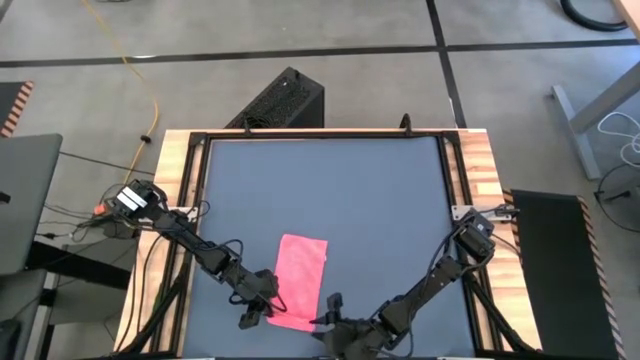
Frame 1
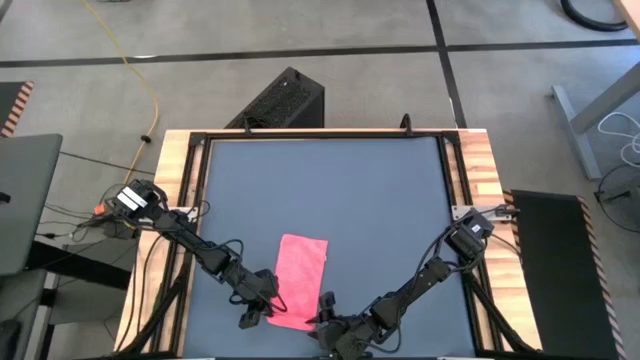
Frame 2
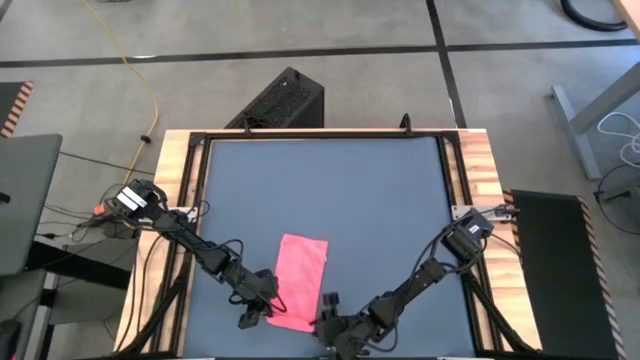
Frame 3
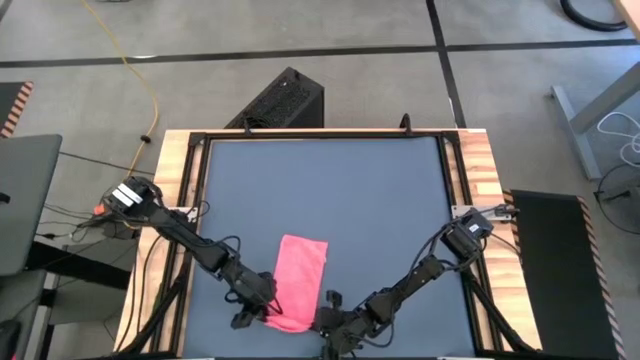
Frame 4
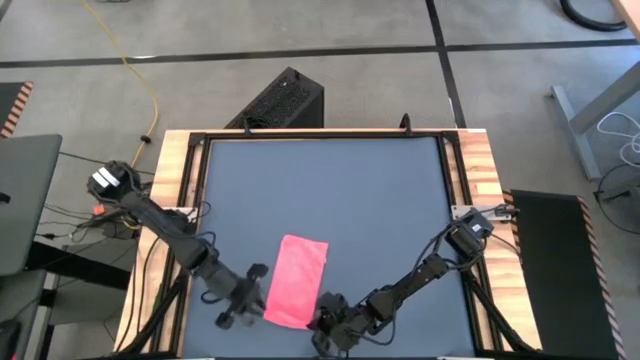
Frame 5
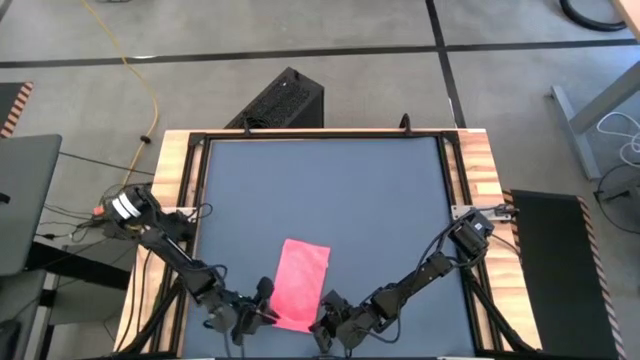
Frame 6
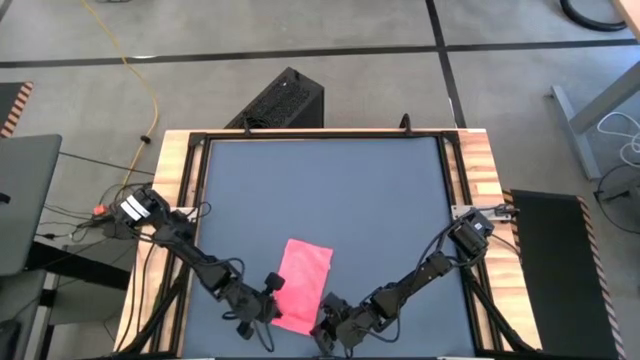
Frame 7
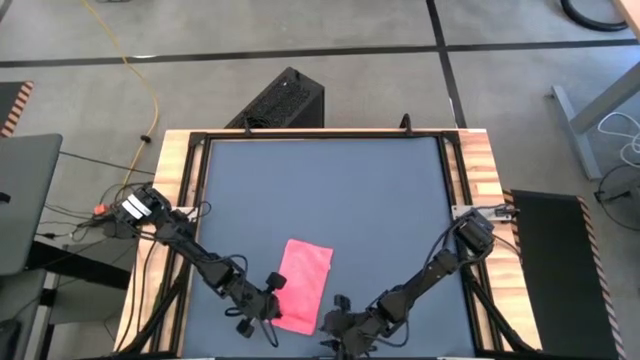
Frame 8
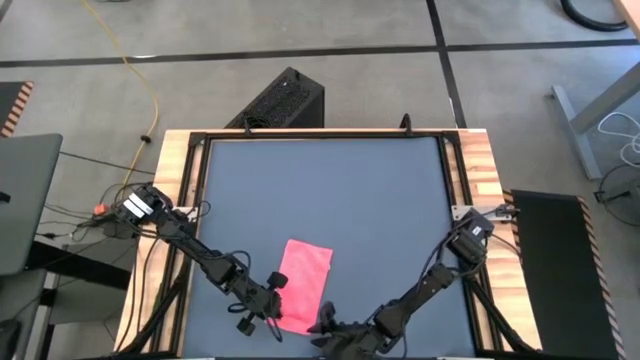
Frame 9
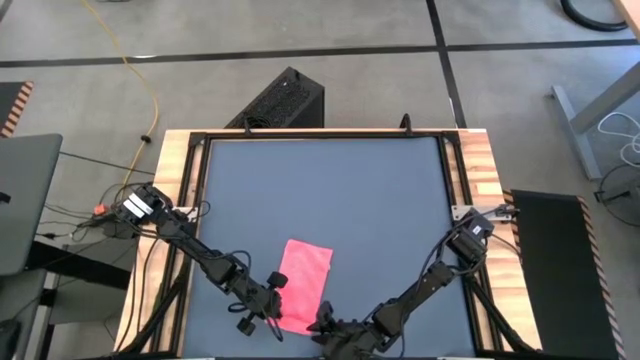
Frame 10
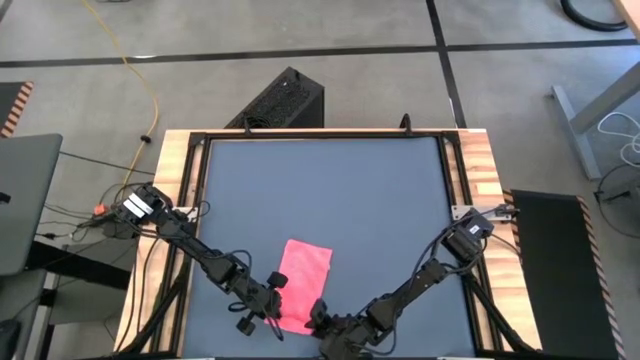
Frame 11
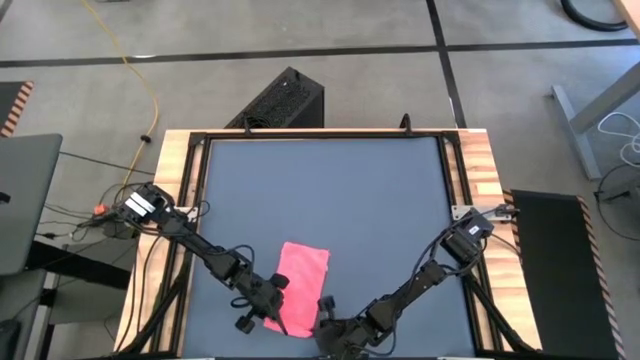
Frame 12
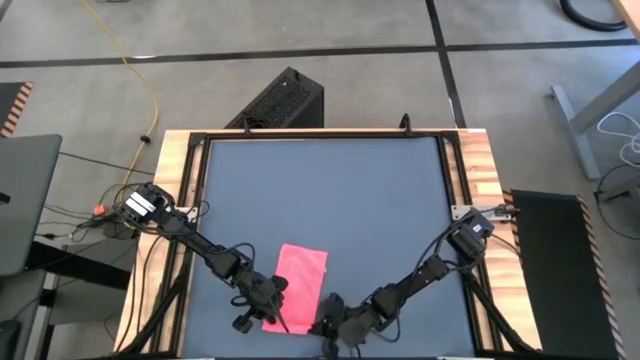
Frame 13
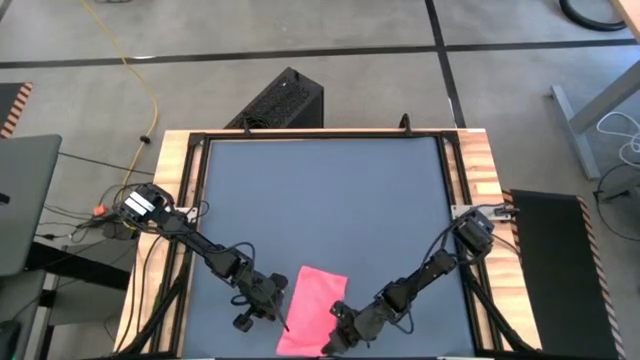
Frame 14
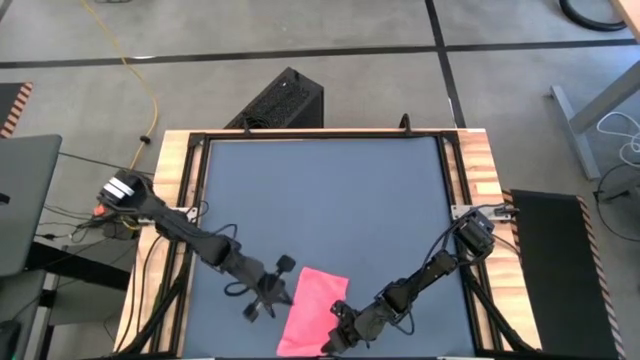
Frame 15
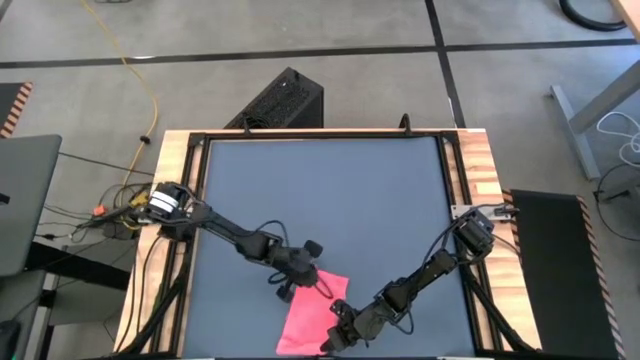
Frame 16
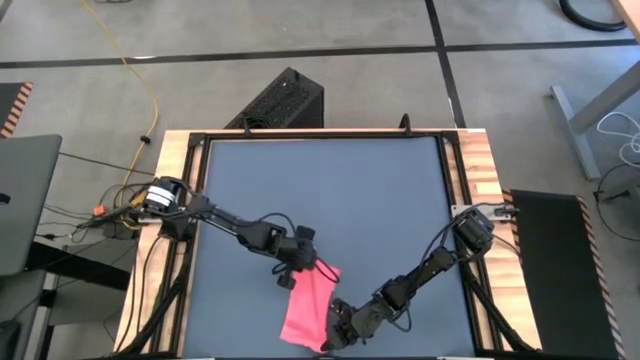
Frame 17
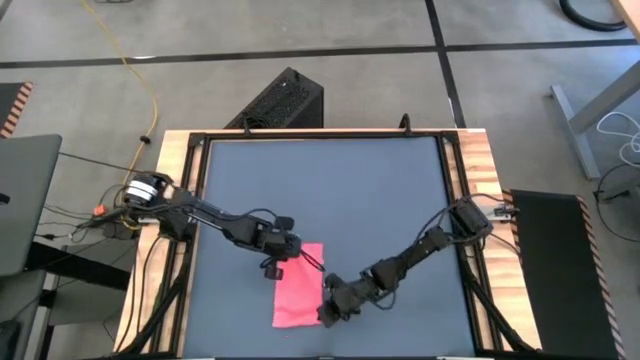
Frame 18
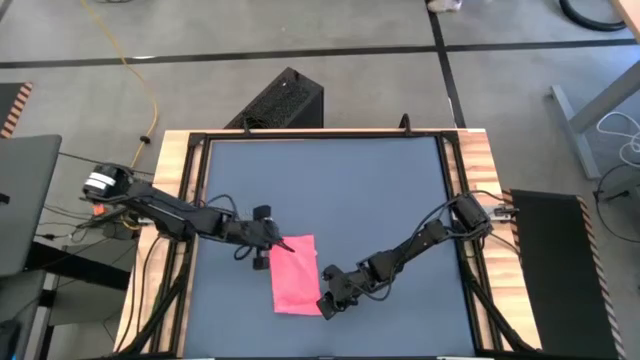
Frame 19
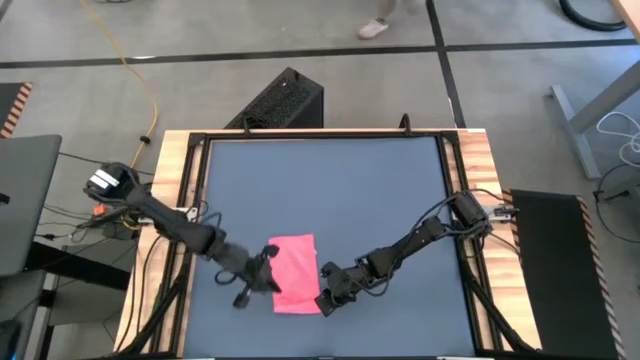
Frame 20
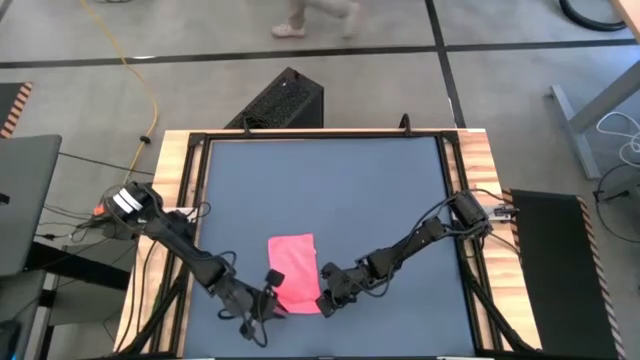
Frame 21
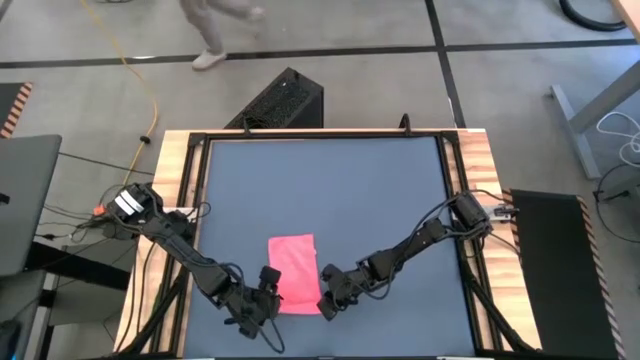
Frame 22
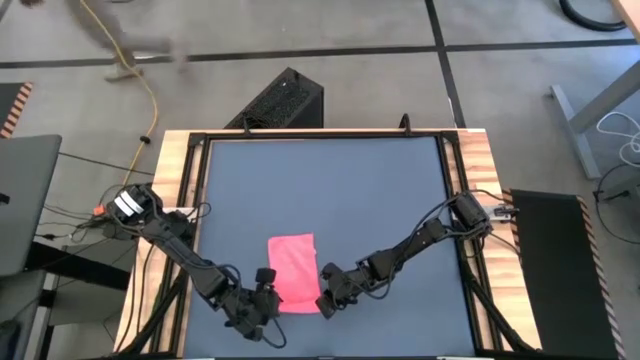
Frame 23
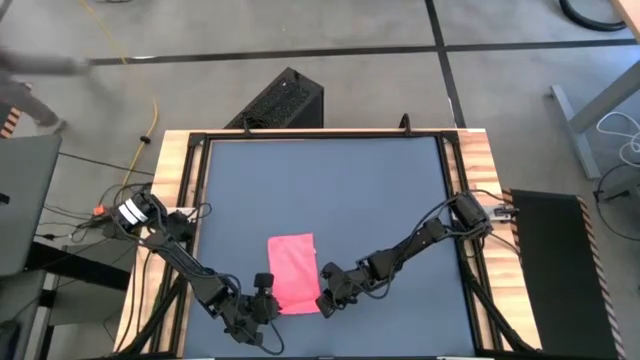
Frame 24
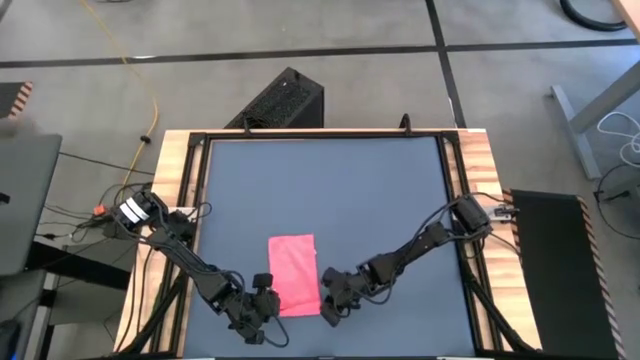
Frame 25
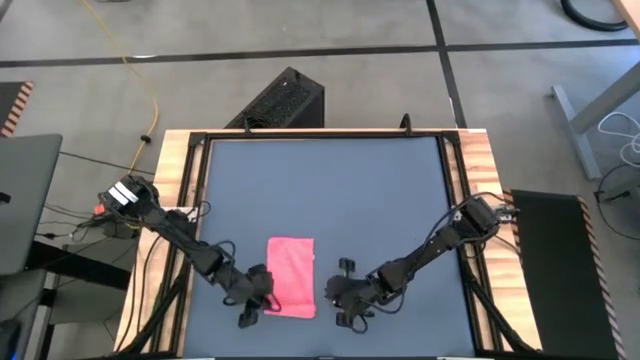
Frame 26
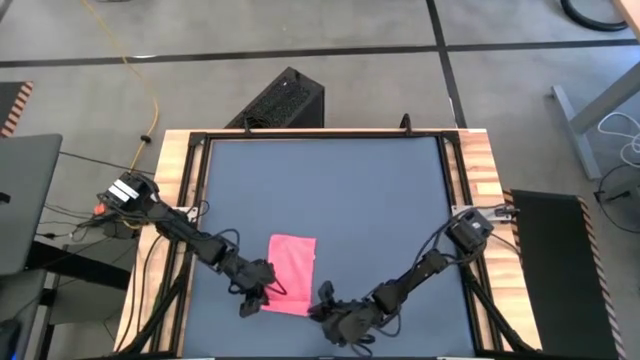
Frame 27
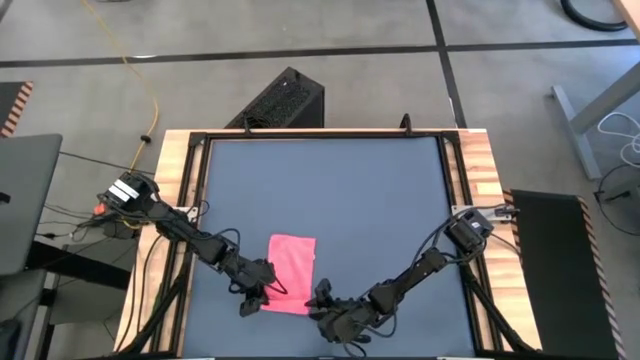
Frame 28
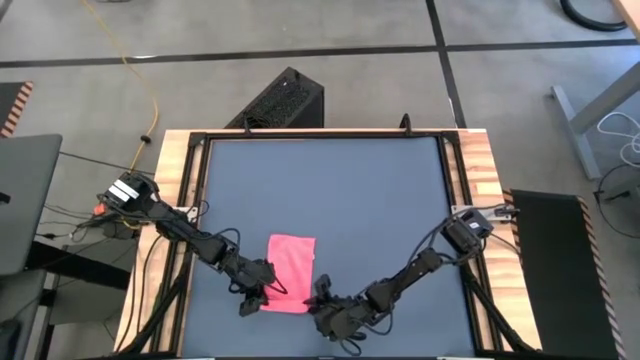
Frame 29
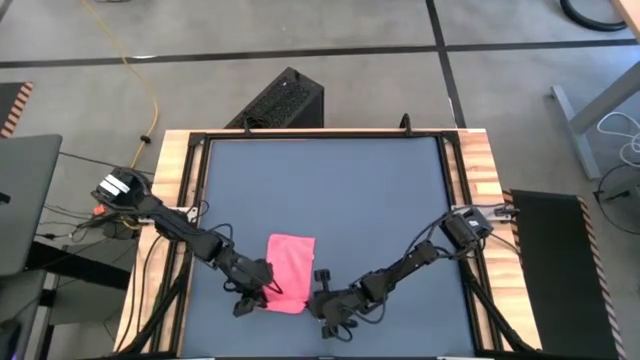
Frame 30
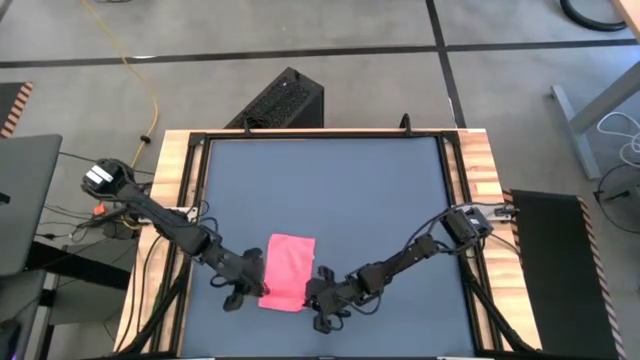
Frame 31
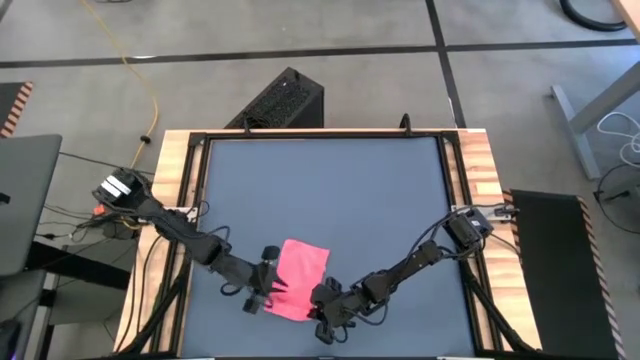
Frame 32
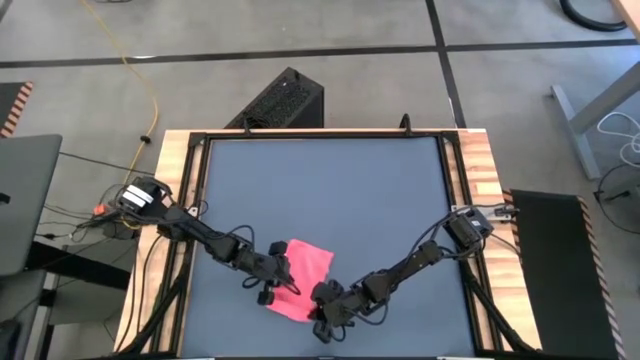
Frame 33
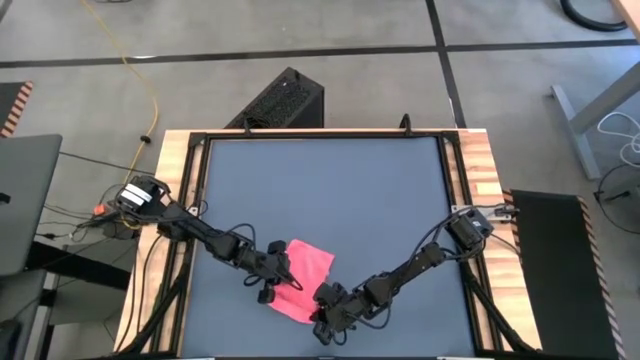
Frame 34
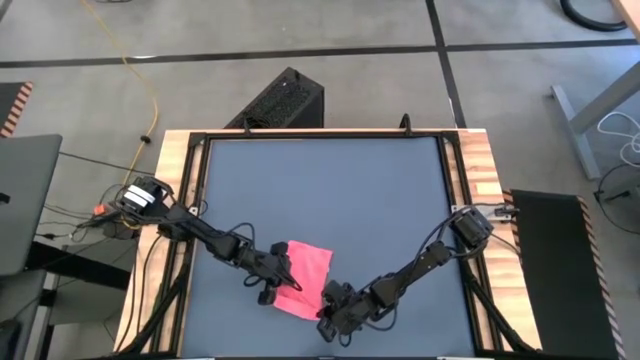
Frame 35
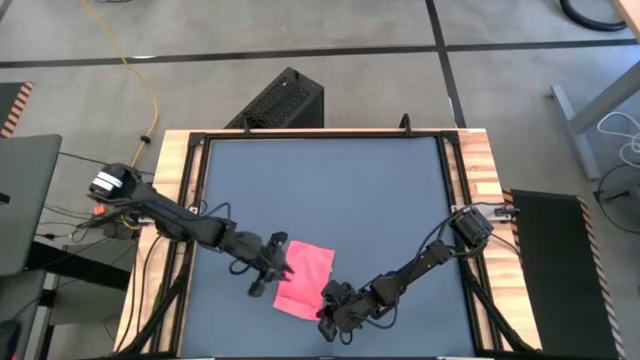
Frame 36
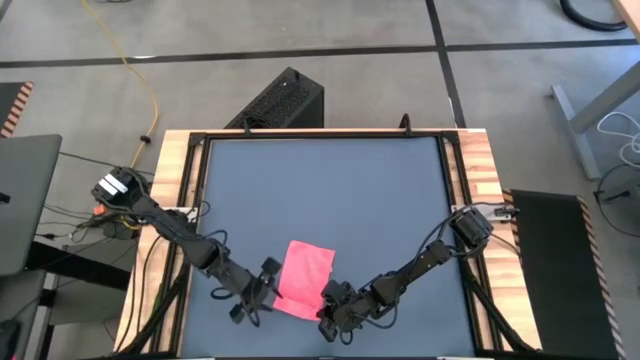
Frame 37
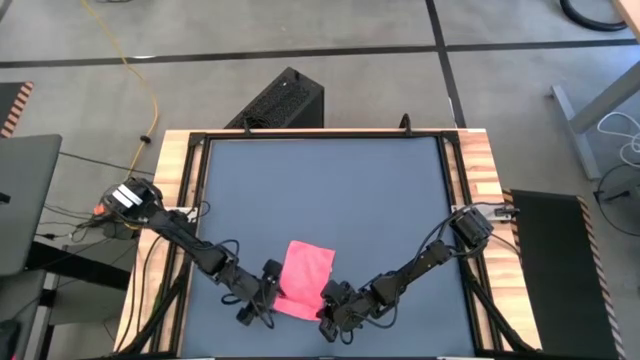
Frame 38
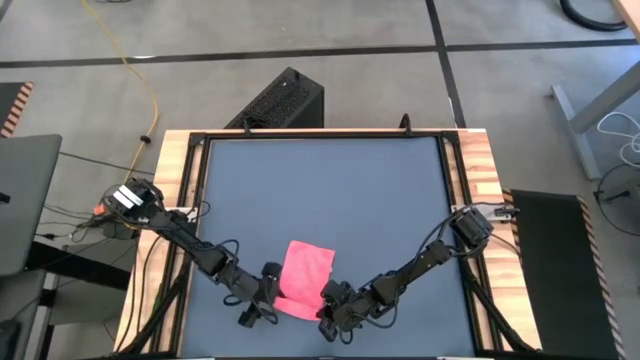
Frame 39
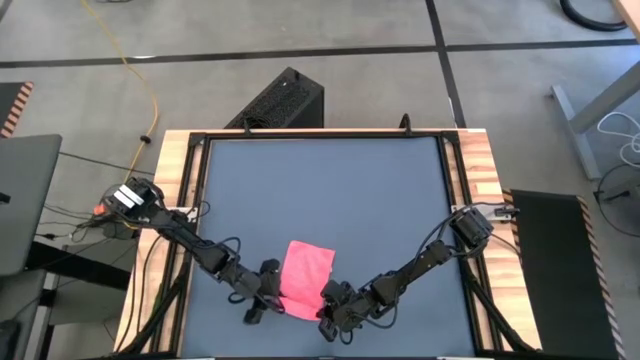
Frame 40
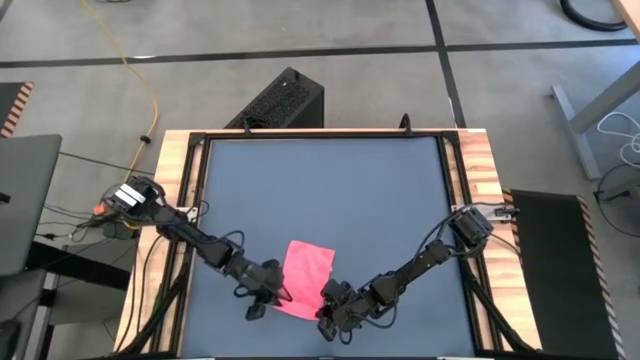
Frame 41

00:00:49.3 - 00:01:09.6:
Task: Roll towel
Roll the pink microfiber towel
